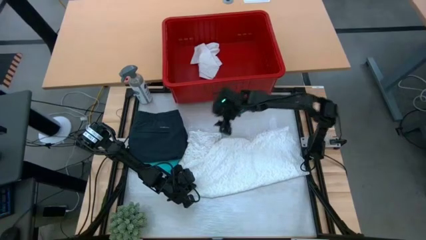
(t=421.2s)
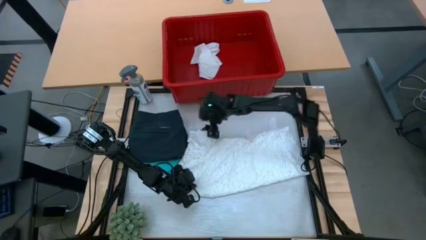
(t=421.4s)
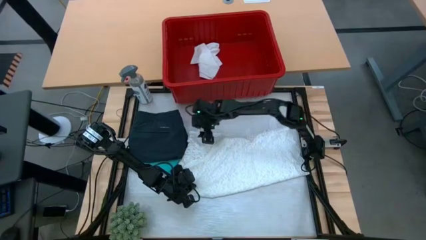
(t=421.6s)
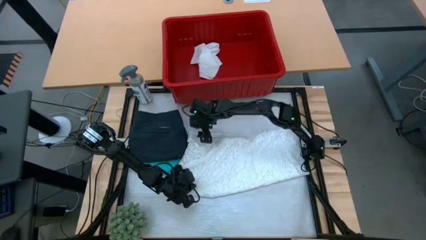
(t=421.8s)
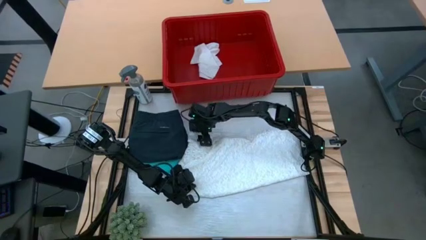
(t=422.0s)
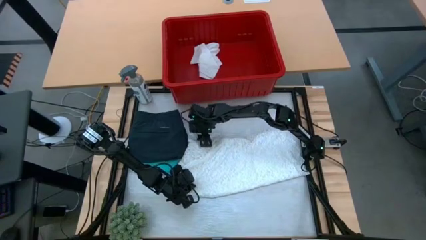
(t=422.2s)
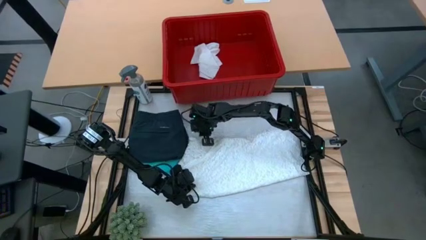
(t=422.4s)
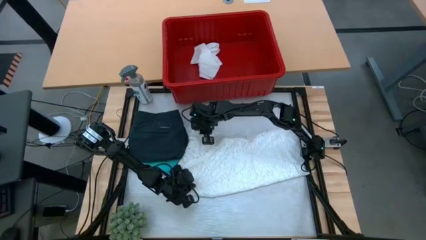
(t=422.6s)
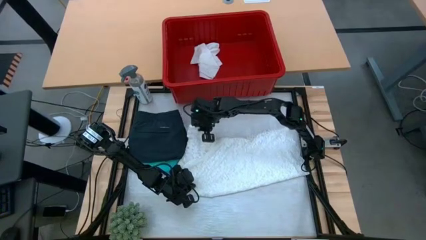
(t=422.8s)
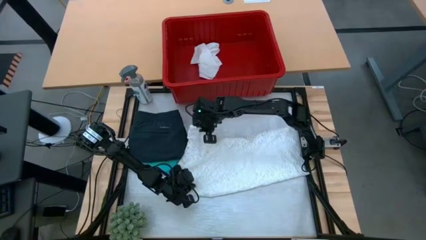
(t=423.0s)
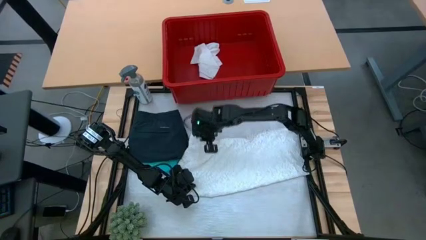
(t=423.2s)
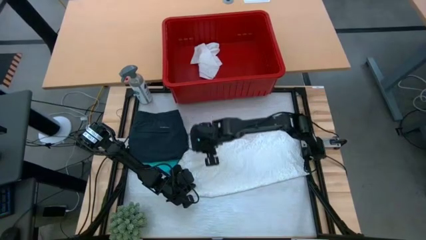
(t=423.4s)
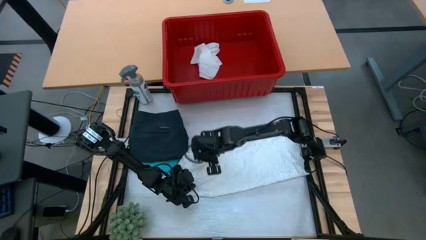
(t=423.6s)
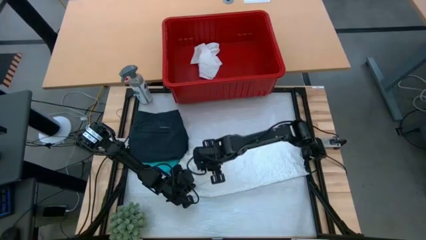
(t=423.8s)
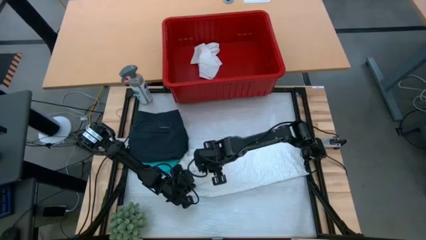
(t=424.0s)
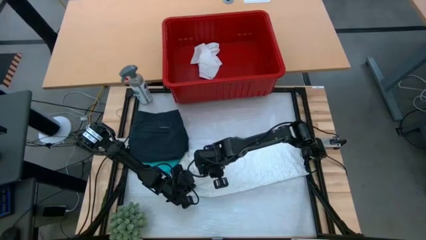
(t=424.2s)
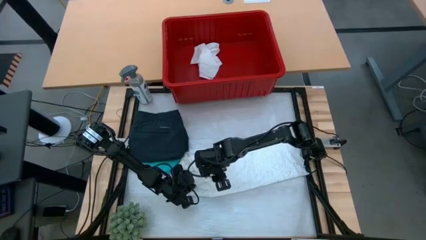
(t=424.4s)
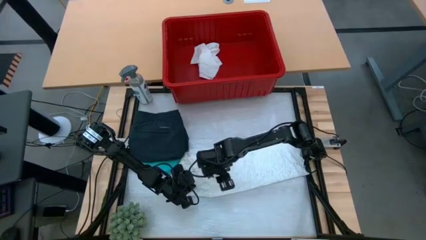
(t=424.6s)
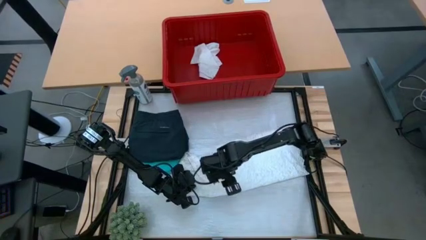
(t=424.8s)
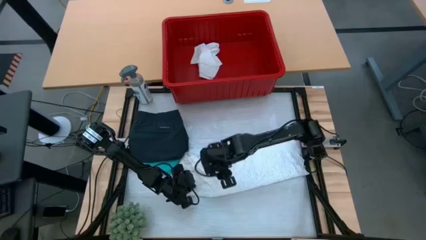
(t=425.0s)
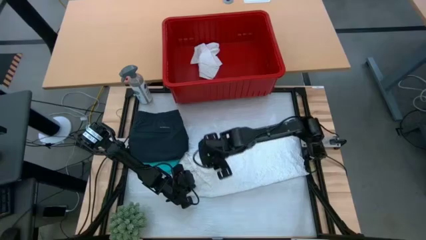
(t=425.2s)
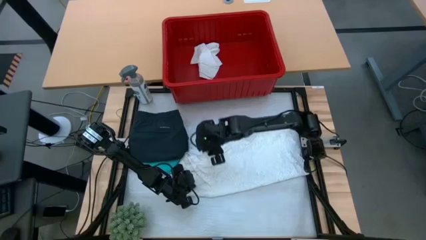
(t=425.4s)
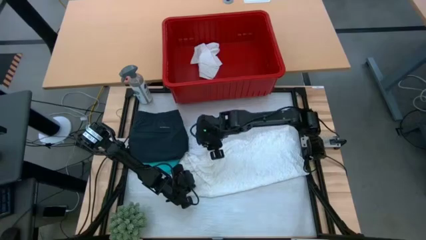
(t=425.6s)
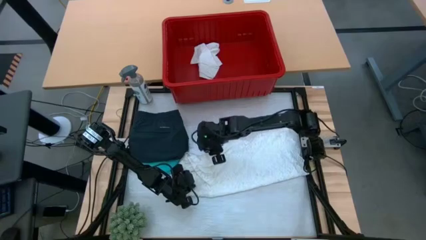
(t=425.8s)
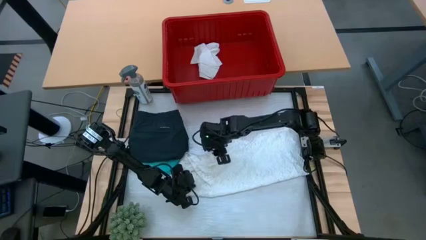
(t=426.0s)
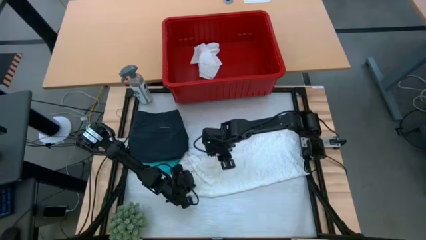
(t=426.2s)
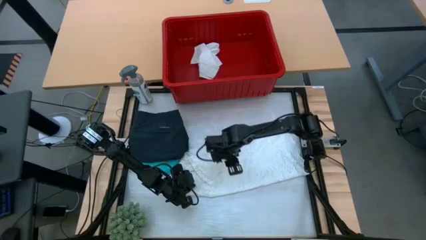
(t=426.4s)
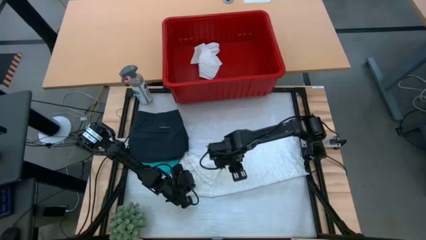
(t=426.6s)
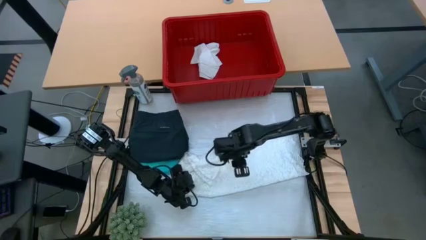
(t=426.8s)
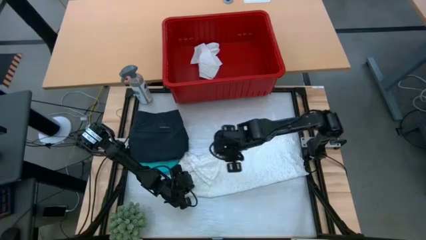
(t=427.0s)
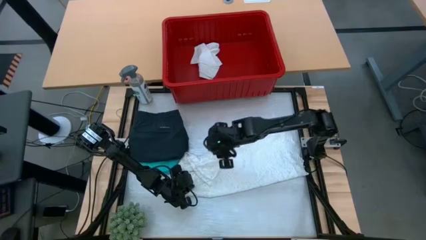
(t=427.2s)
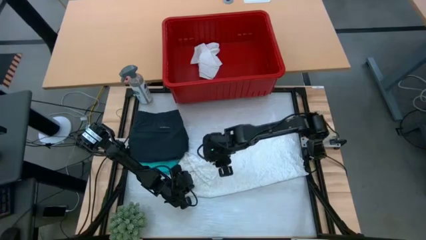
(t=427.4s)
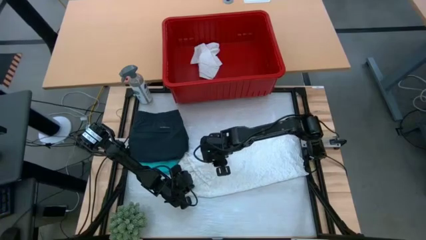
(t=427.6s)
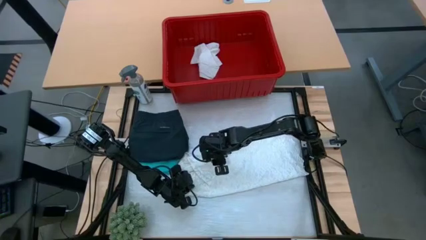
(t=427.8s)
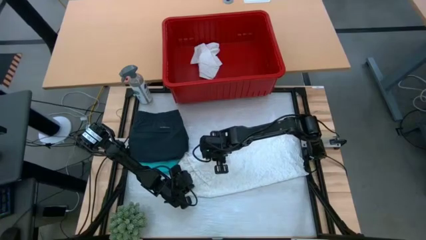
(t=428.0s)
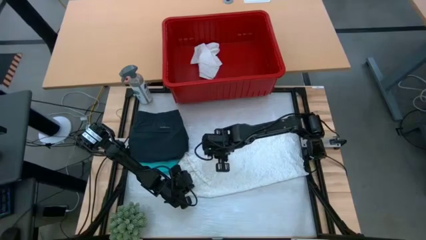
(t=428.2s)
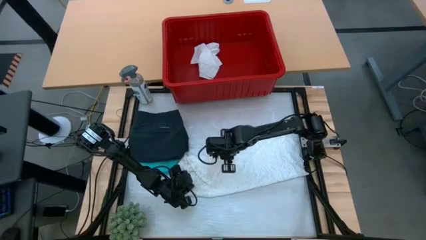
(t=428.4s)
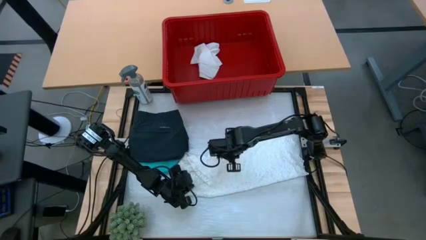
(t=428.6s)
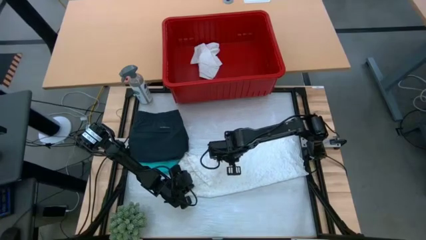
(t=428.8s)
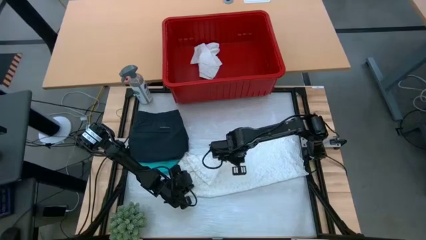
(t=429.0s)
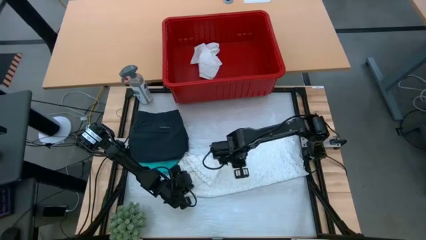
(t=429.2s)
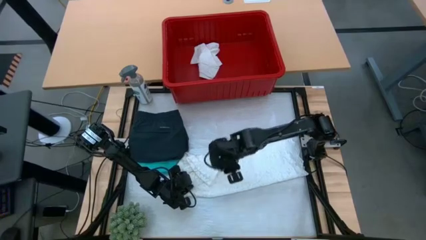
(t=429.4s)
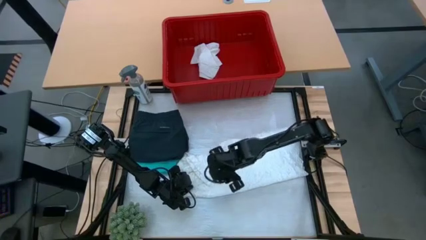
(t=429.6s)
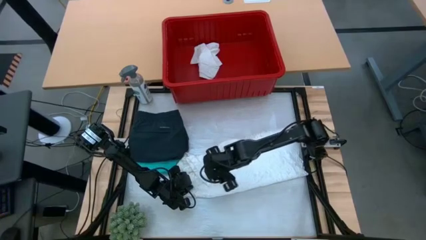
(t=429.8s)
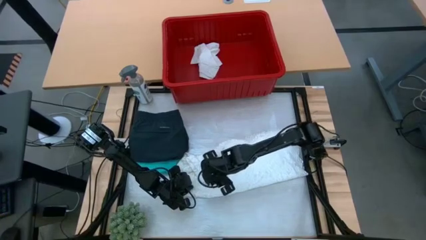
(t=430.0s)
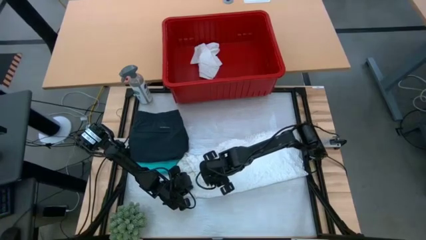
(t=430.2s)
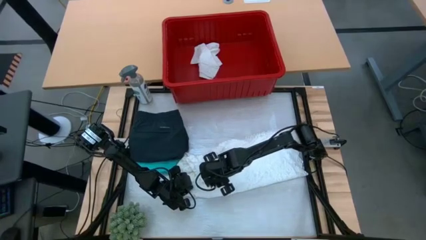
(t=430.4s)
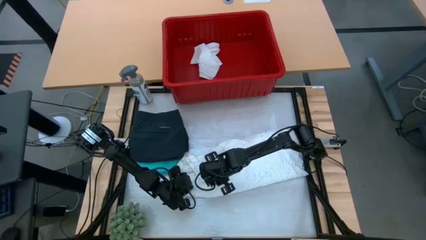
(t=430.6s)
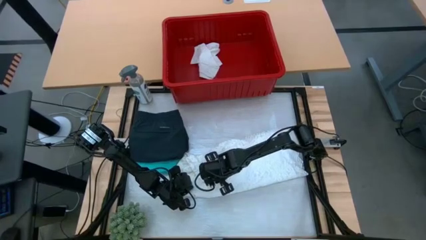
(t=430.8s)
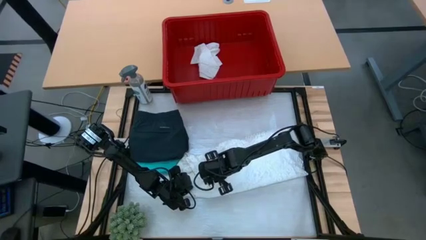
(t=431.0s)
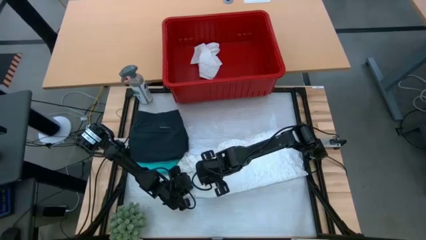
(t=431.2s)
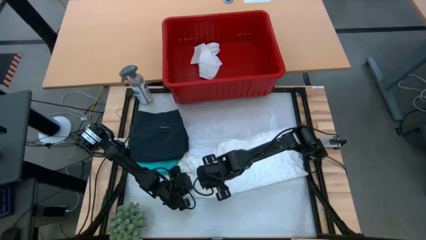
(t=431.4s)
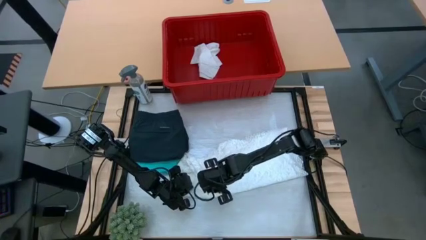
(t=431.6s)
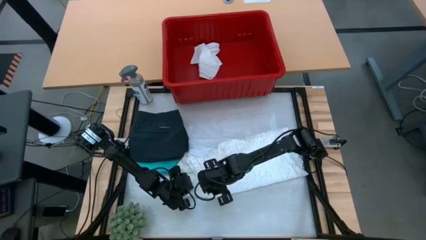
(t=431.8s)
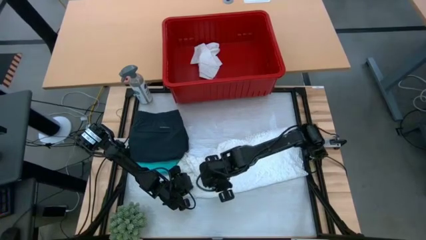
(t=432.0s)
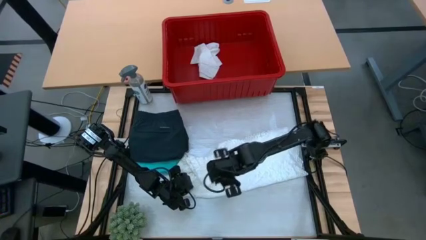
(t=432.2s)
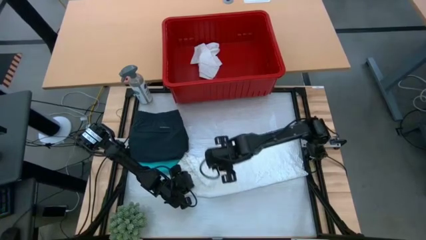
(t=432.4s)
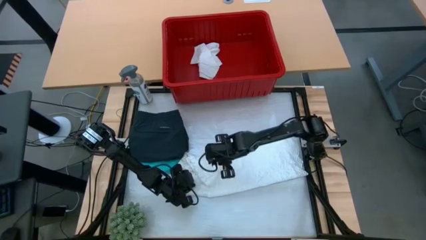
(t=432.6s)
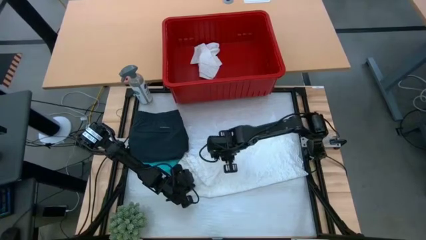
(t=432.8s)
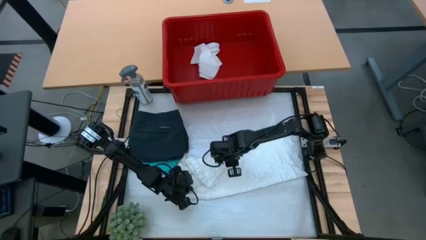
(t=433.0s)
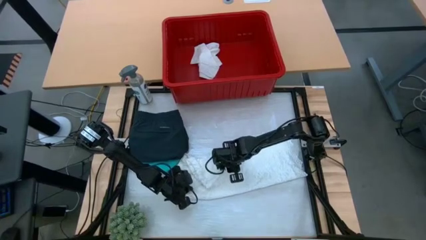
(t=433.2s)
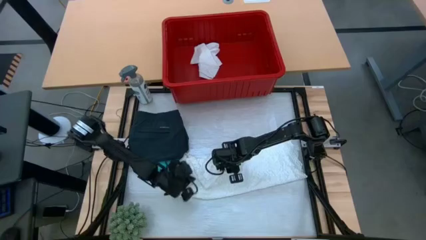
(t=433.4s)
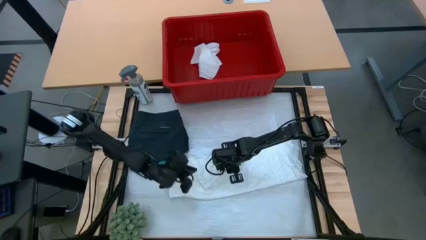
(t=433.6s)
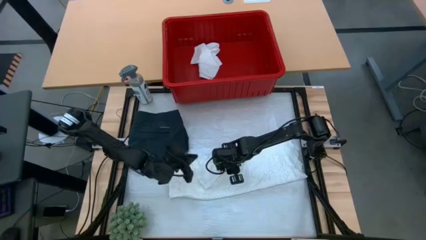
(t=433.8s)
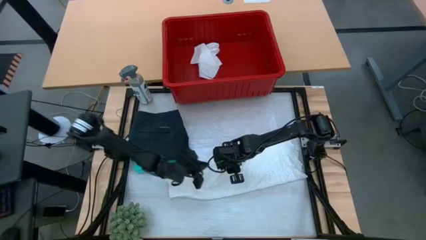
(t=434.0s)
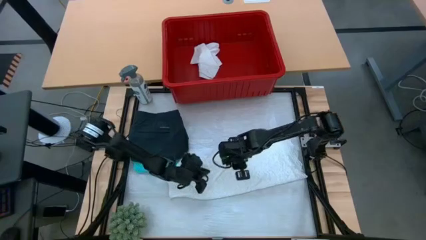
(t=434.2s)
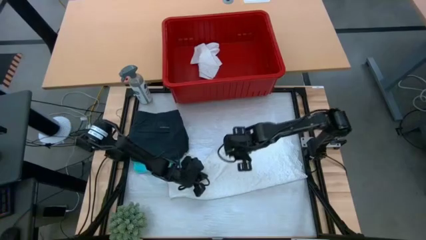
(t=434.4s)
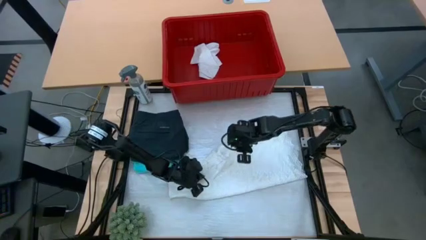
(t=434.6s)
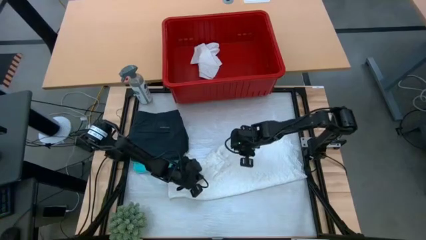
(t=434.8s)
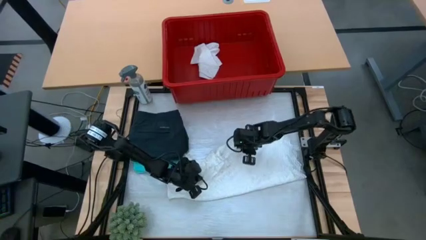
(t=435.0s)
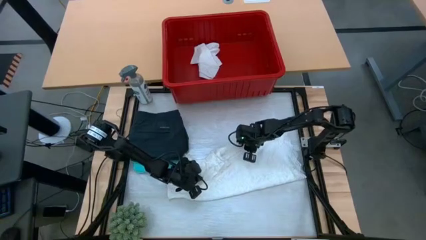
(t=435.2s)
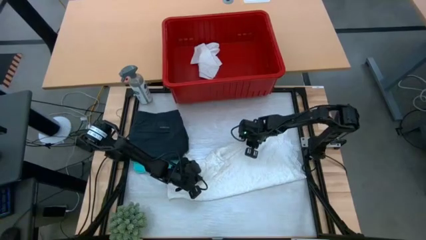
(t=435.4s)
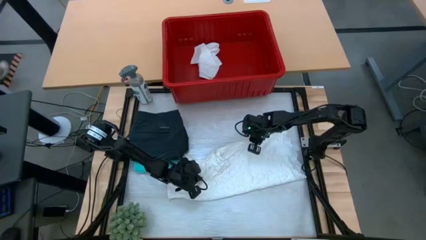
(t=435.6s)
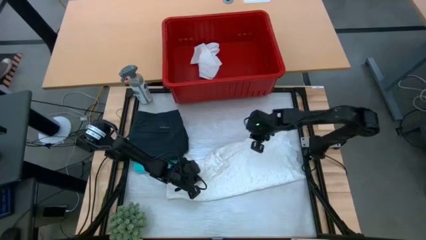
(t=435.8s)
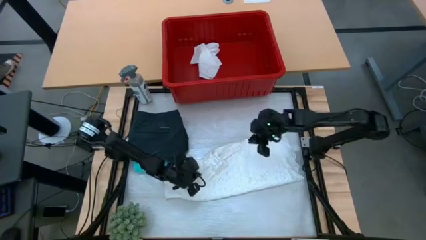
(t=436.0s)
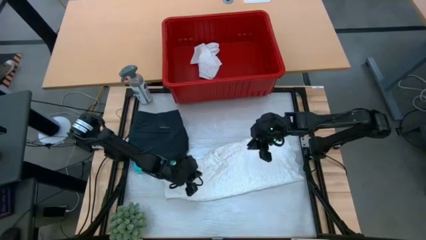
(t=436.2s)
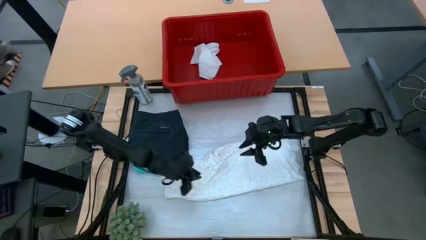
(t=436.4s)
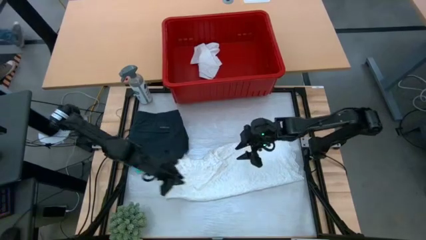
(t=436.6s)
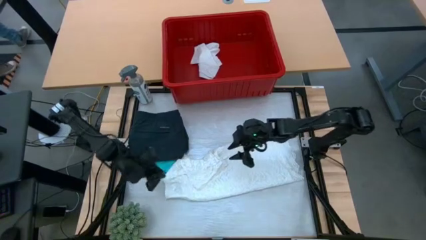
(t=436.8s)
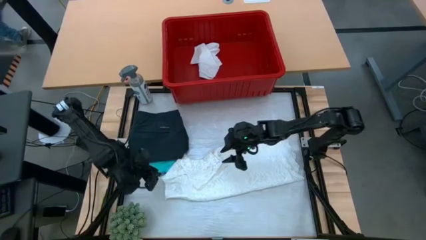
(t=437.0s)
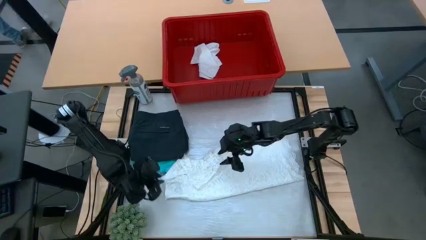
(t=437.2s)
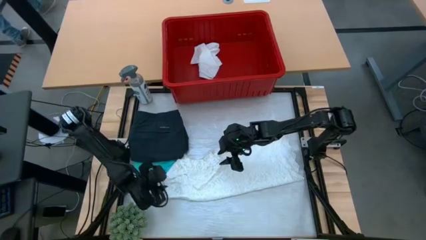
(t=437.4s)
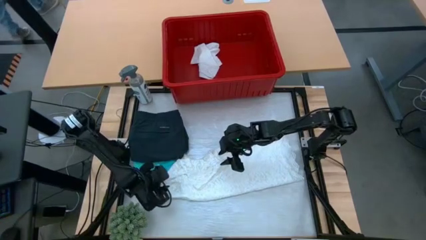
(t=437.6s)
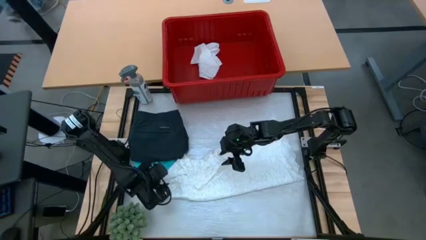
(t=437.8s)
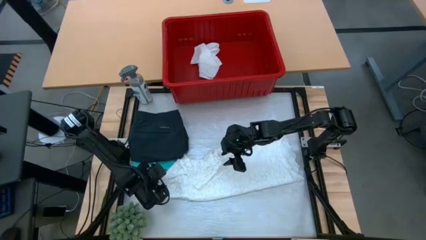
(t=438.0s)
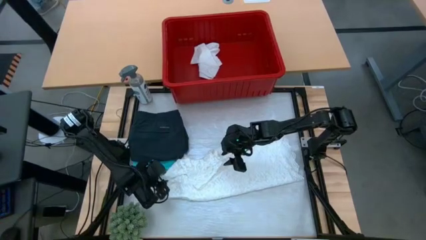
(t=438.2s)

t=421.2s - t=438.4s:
Task: Fold laundry
Fold the white dress
